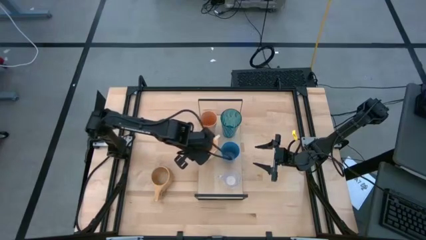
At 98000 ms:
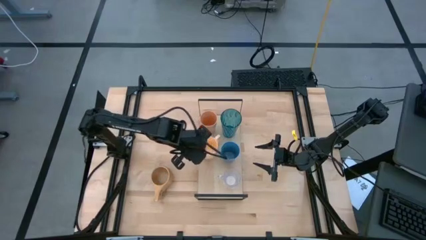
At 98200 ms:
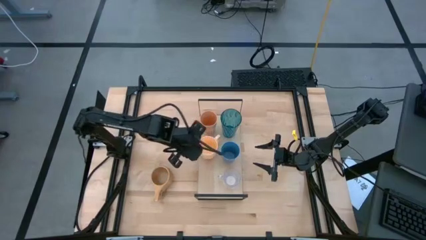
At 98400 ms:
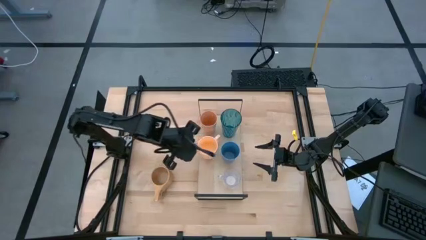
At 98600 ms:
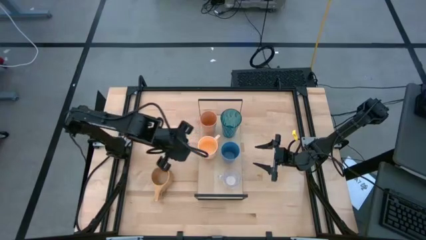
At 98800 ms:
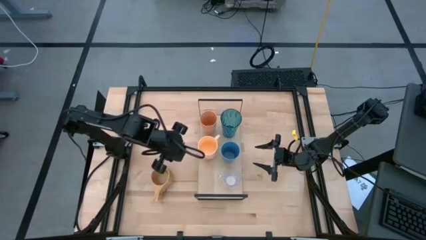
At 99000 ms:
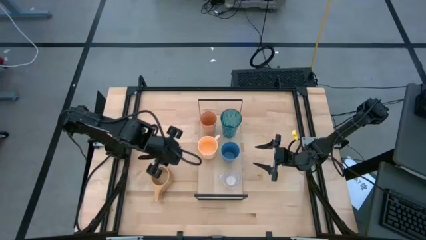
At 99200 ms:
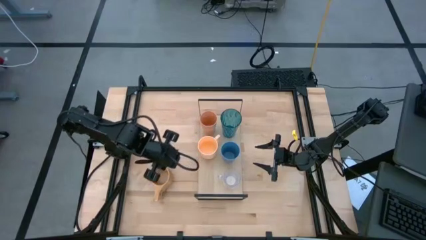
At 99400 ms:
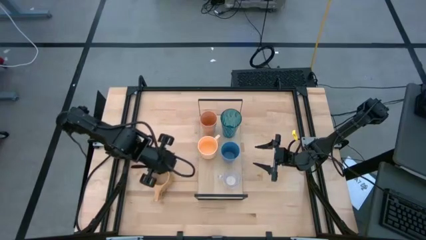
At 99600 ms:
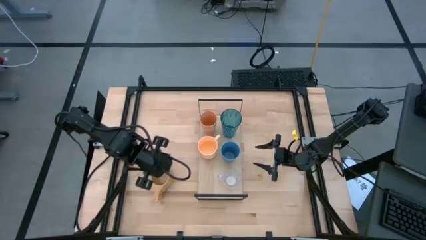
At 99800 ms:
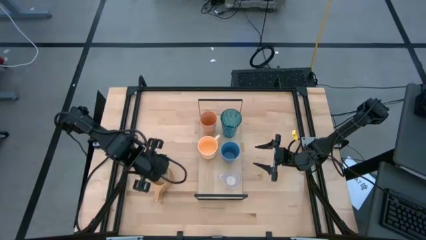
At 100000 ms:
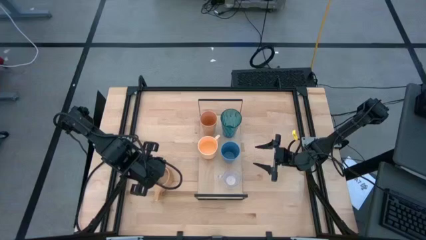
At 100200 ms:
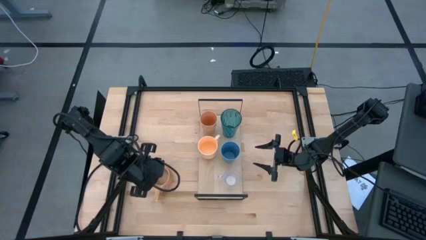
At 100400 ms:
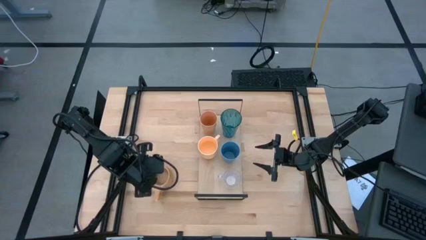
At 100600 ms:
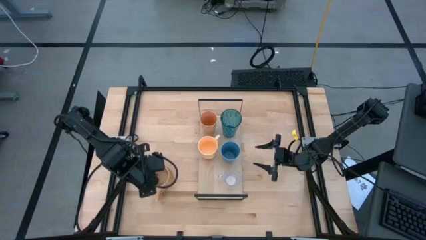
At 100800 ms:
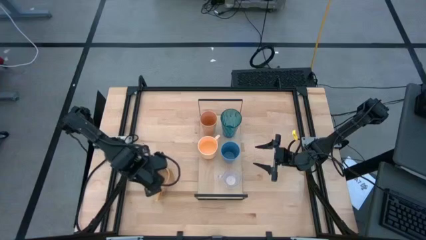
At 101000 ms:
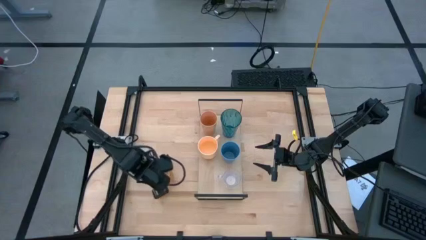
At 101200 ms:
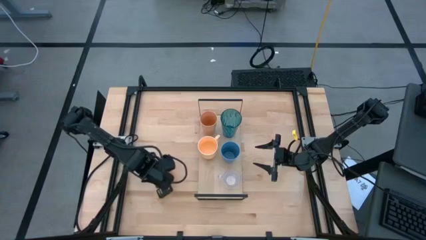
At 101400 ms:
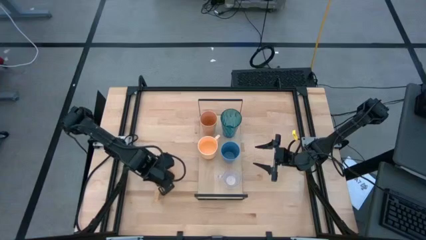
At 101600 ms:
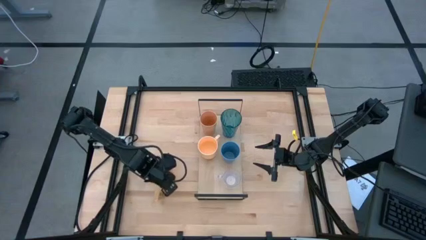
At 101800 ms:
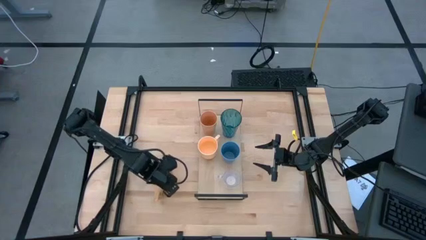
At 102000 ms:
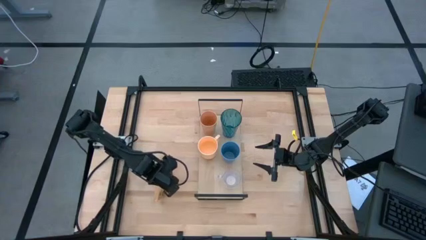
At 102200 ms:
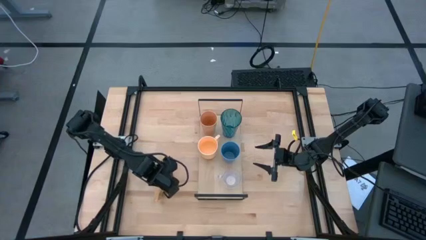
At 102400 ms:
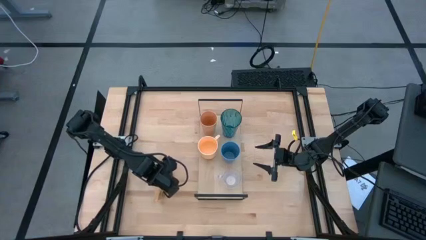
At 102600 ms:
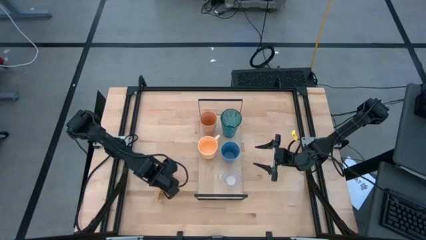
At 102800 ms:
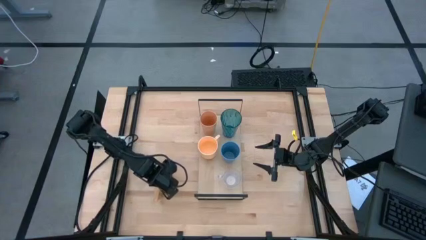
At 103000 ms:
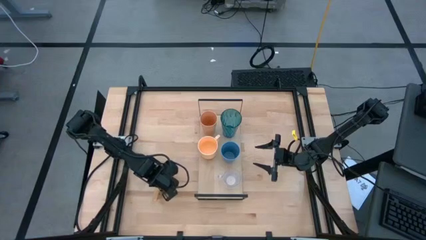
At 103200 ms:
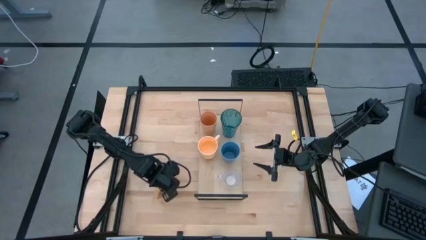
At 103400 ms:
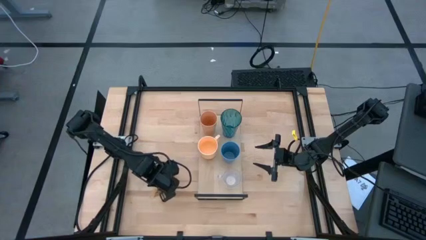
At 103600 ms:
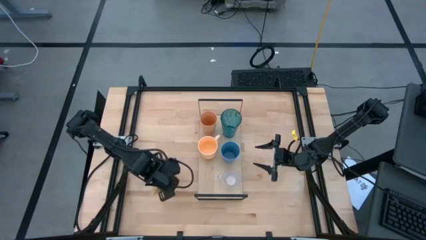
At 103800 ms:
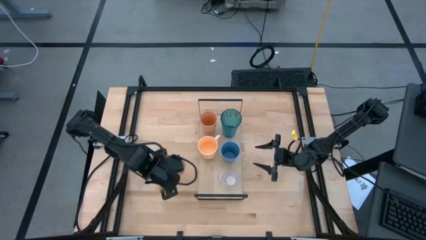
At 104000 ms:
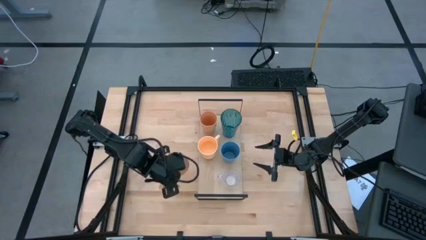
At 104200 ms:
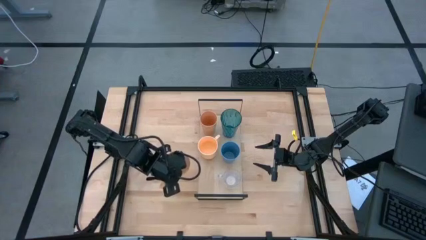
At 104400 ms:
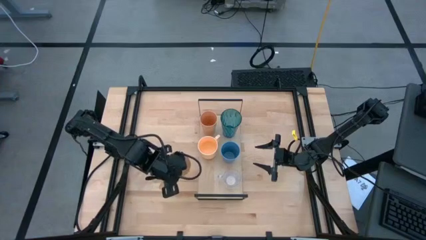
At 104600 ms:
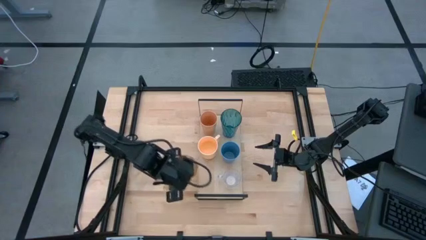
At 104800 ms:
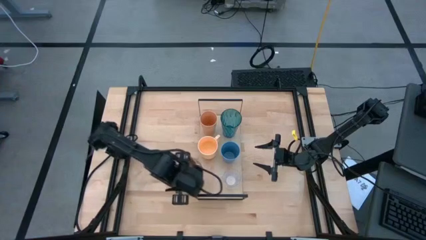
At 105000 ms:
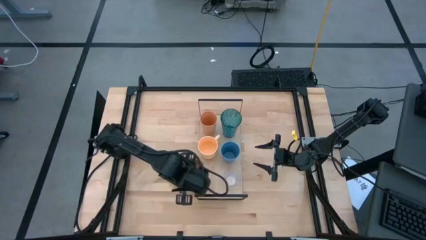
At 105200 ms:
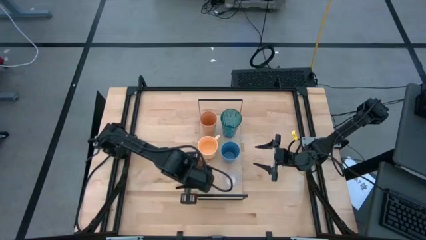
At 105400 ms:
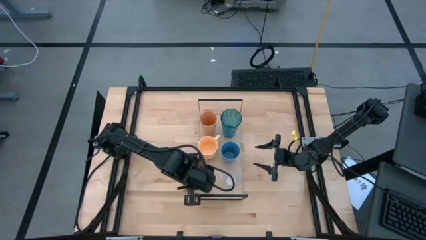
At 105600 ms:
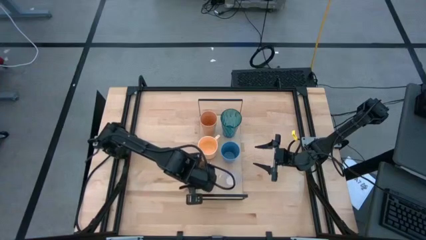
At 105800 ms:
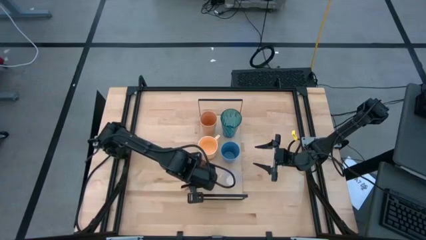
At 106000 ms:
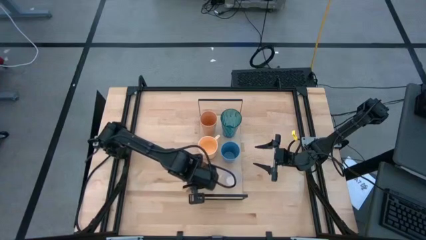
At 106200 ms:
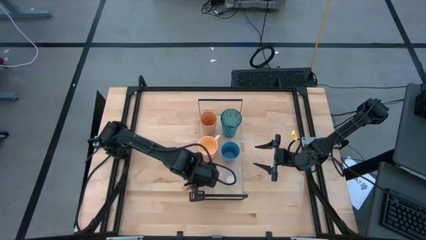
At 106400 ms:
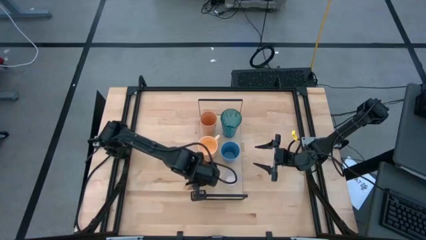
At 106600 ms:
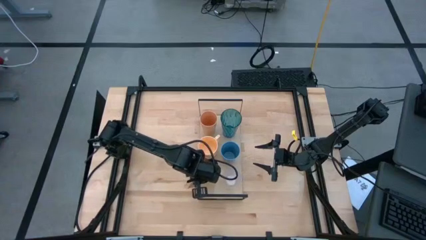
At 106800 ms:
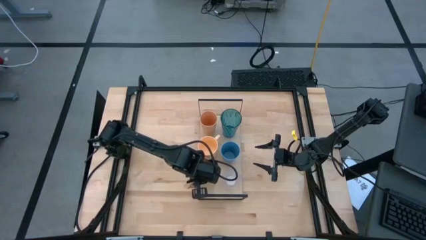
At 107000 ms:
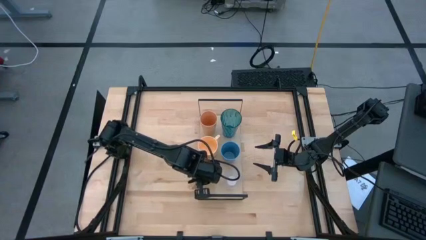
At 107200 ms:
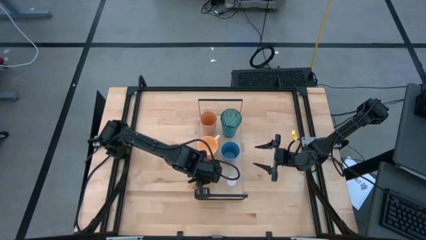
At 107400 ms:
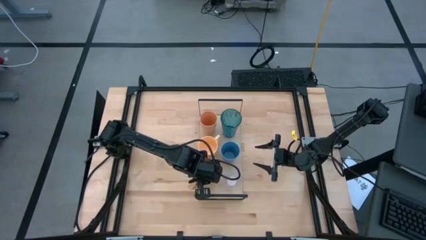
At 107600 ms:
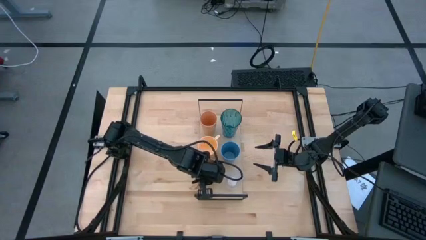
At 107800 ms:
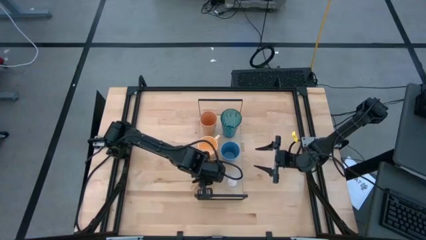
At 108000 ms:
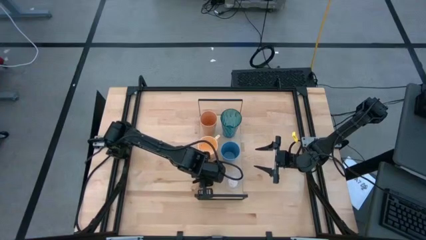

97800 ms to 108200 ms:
Task: Stack small to large cups/mugs on shelf
Put the brown mug on the shelf

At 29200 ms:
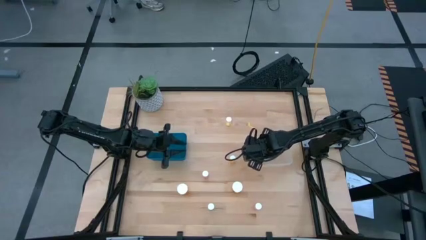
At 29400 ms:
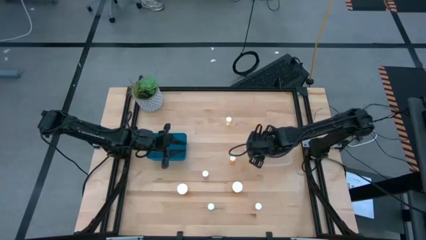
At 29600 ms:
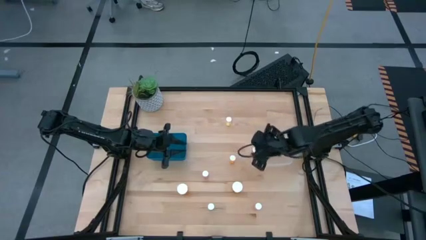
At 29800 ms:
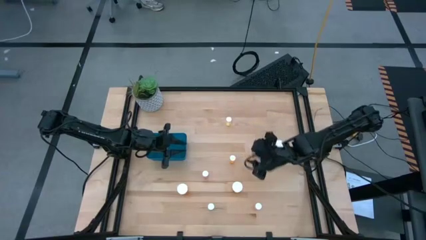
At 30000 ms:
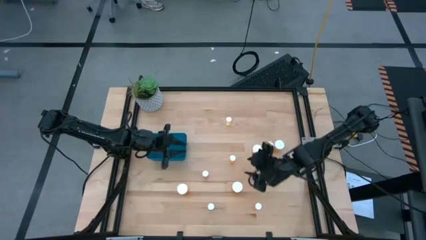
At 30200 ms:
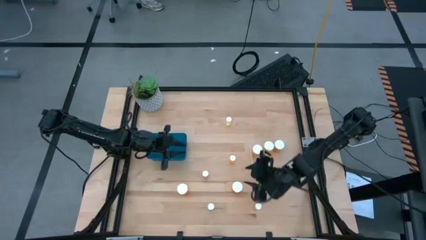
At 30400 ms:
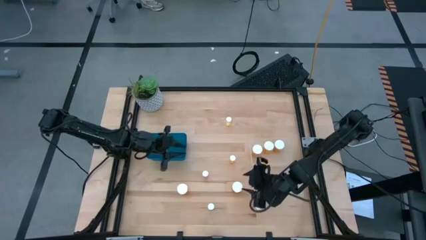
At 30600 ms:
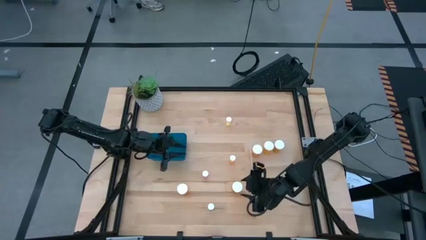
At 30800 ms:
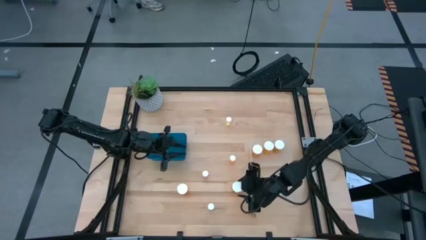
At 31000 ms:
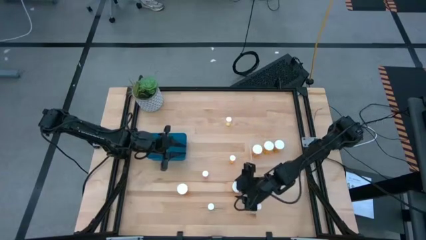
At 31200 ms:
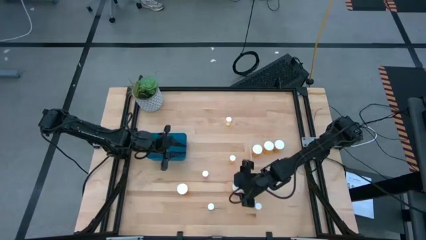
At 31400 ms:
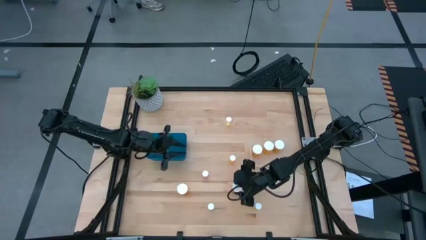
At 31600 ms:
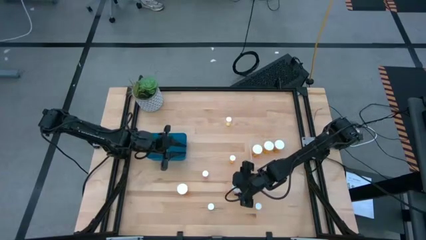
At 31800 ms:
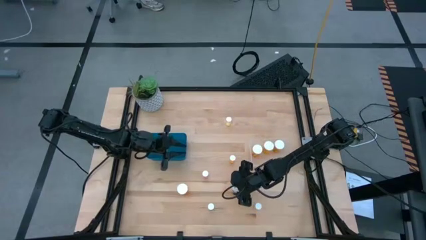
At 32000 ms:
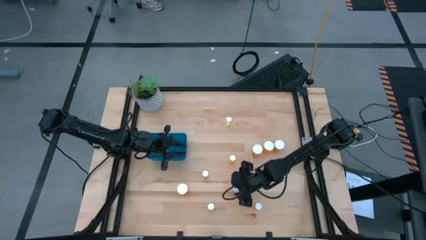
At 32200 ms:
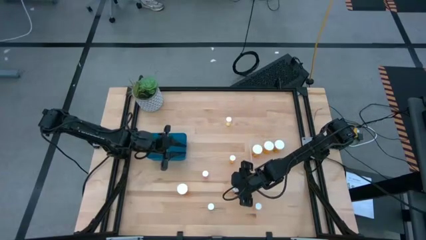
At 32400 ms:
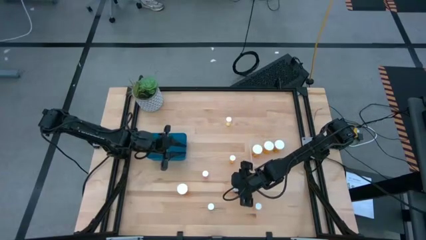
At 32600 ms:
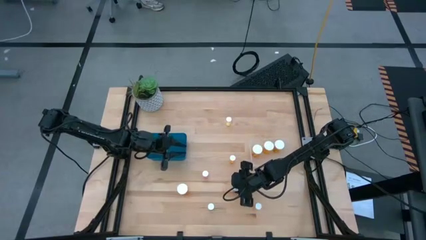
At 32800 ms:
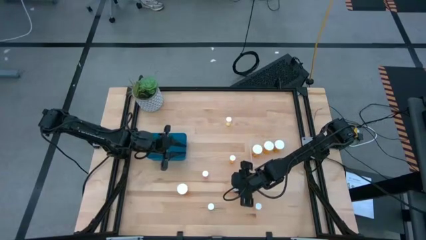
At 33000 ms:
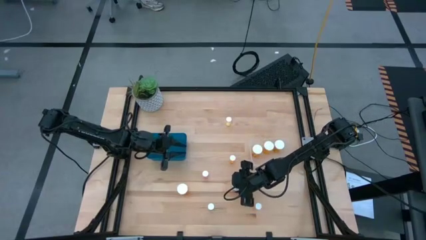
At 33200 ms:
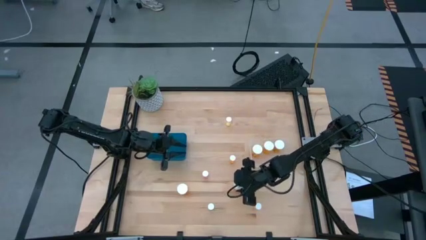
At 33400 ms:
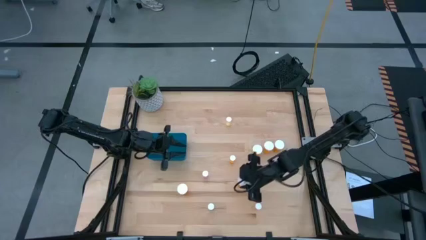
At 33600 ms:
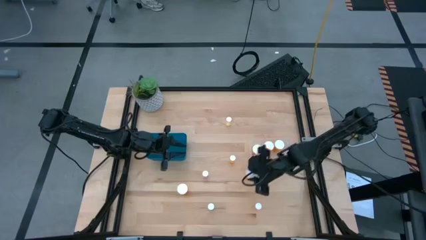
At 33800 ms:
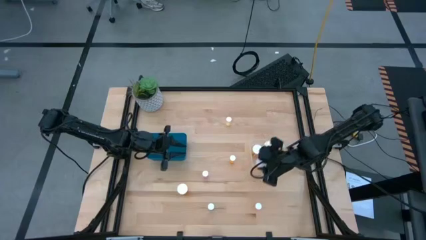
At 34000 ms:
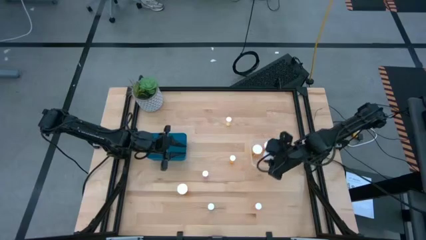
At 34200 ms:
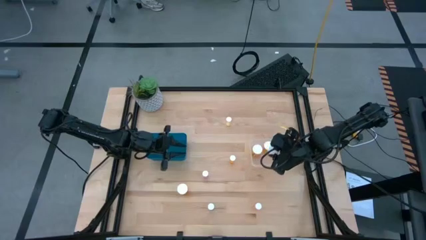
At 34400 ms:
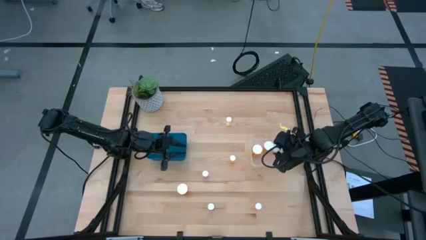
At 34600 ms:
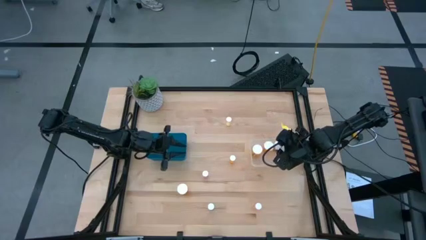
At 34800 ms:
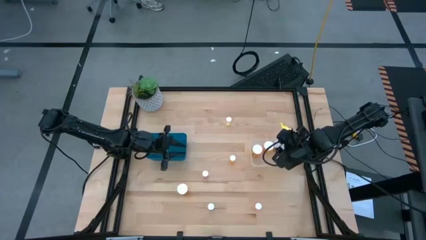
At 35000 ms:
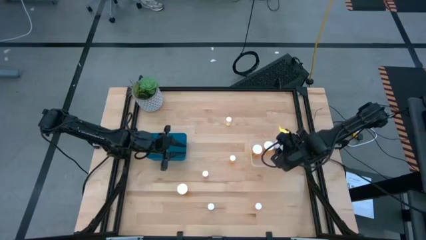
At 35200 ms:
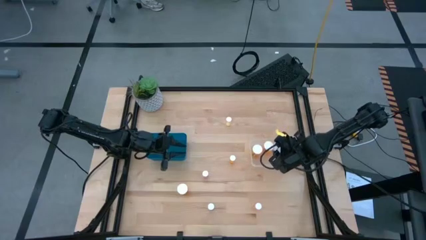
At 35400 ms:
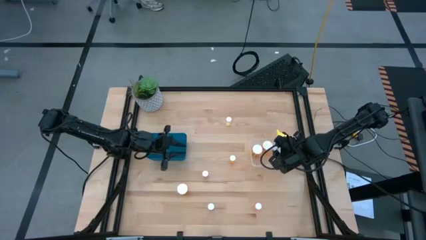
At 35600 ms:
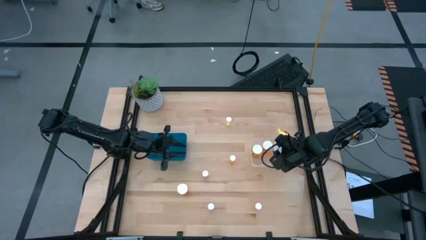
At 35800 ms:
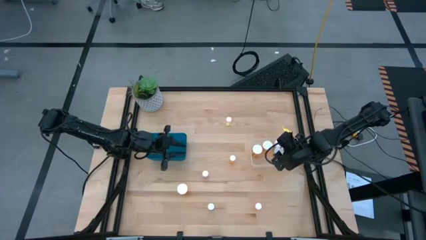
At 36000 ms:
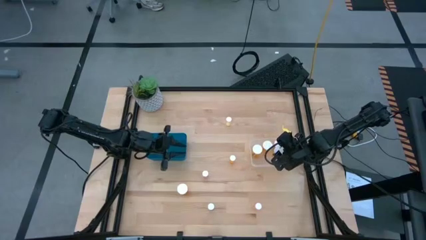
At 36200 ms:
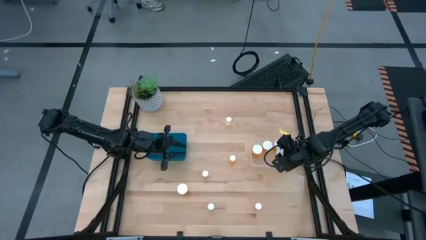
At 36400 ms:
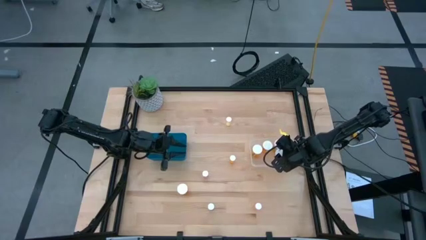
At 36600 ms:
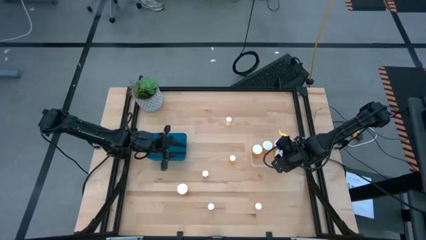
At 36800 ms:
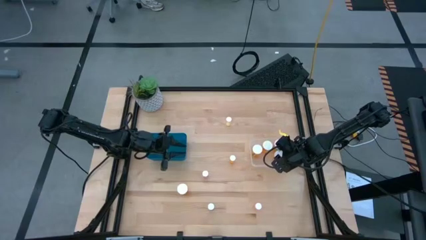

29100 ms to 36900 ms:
Task: Pick and place medicine bottles into bin by pill shape (circle, oval)
Put the large orange pill bottle into the transparent bin
